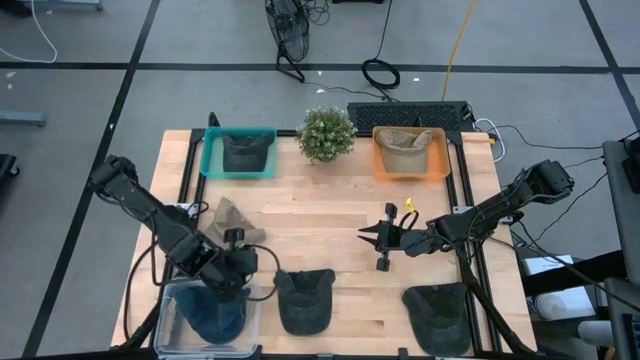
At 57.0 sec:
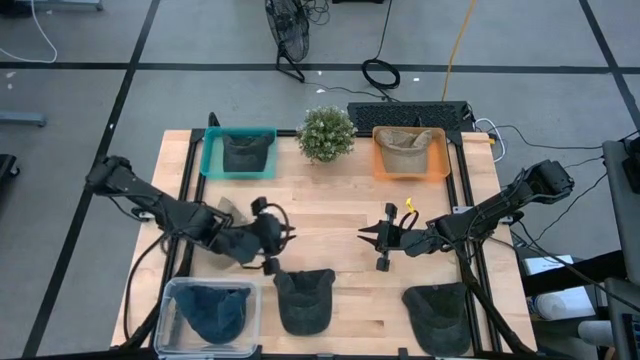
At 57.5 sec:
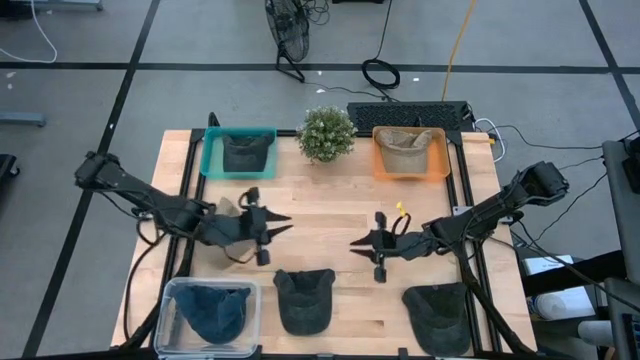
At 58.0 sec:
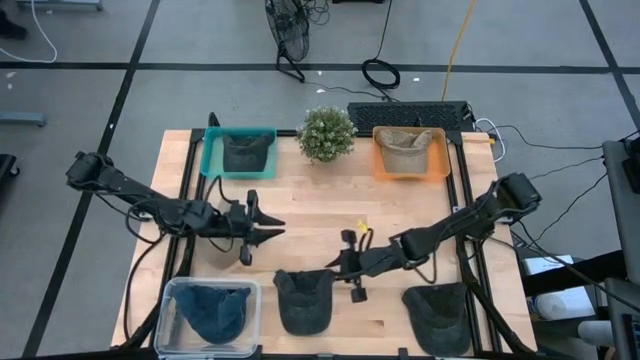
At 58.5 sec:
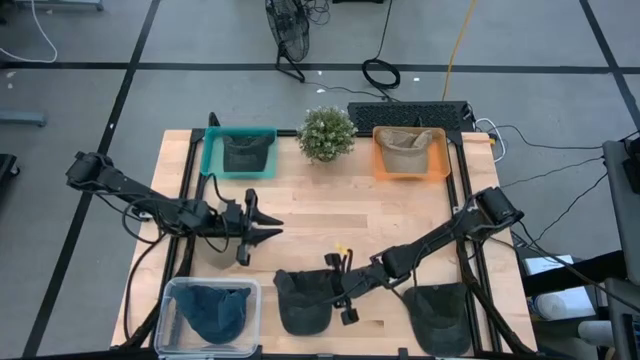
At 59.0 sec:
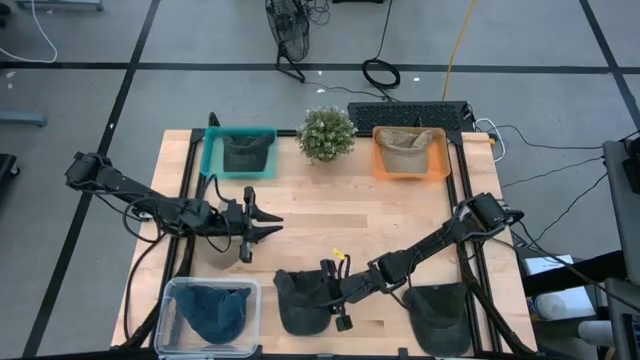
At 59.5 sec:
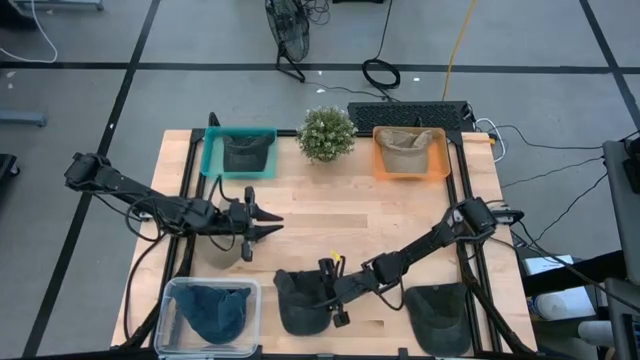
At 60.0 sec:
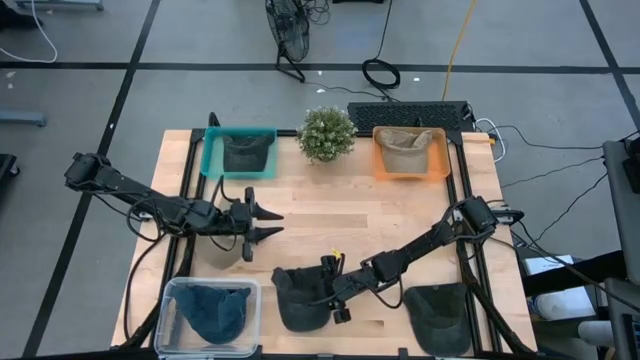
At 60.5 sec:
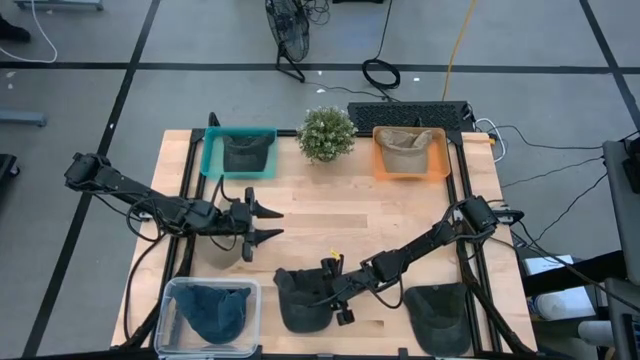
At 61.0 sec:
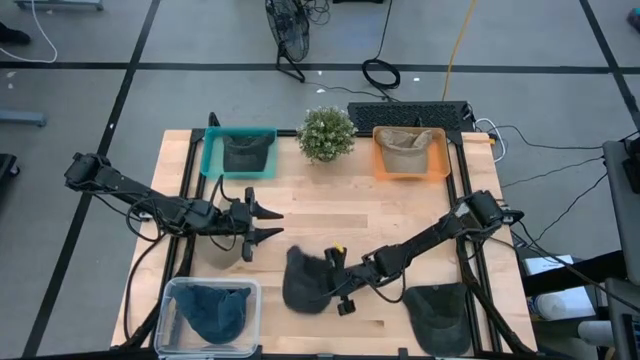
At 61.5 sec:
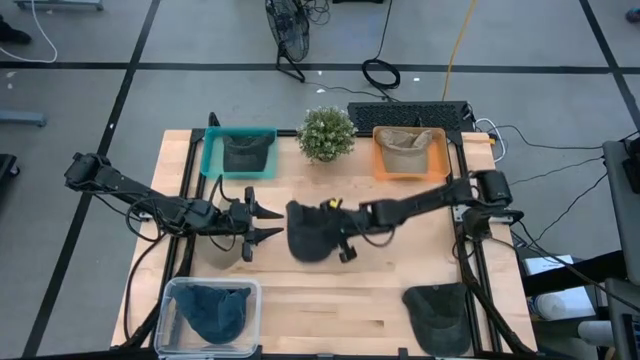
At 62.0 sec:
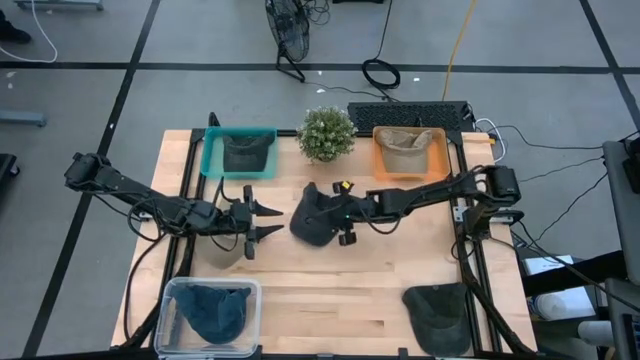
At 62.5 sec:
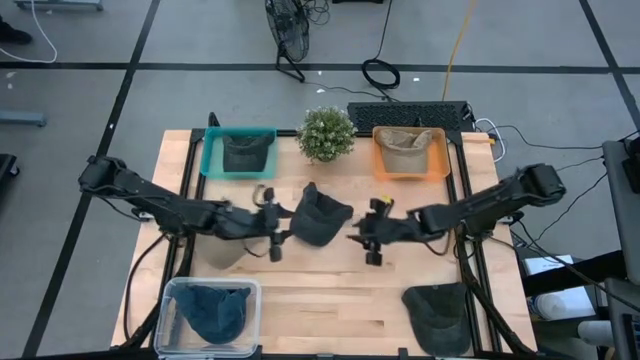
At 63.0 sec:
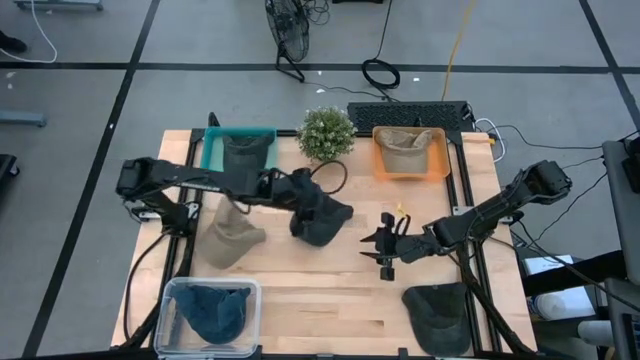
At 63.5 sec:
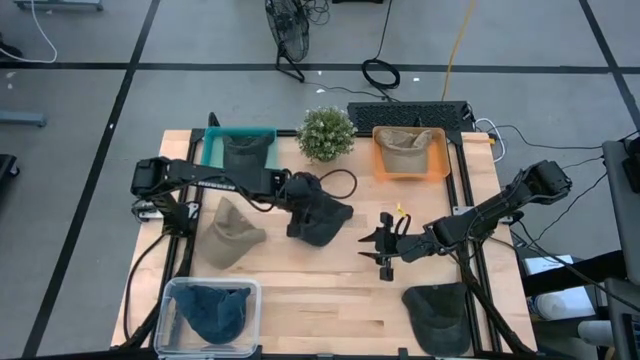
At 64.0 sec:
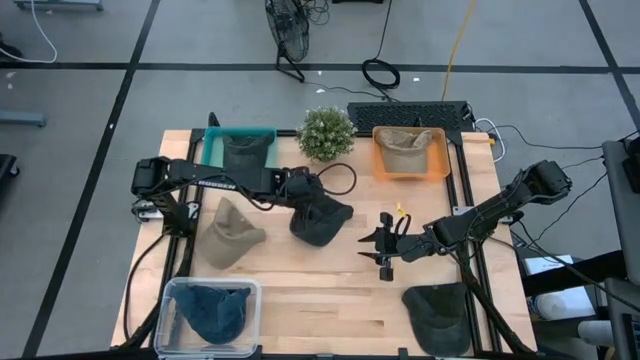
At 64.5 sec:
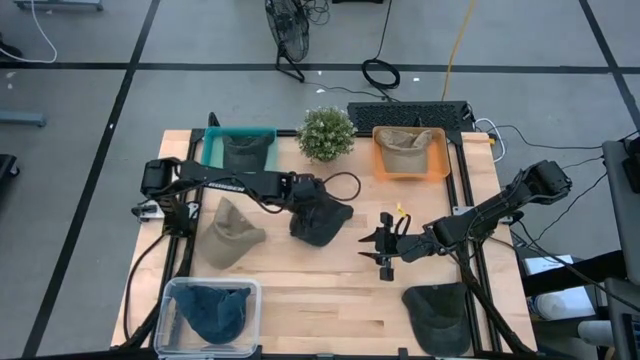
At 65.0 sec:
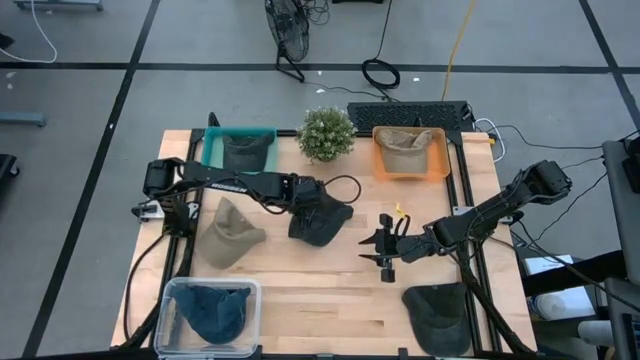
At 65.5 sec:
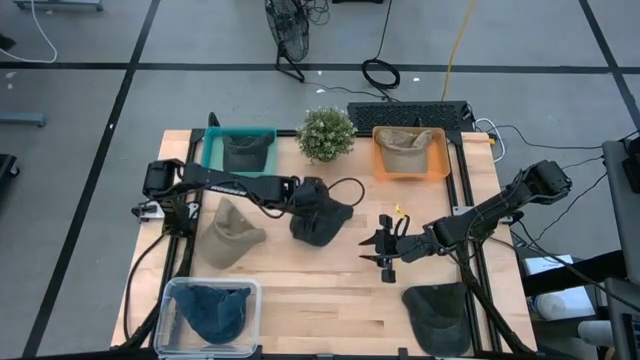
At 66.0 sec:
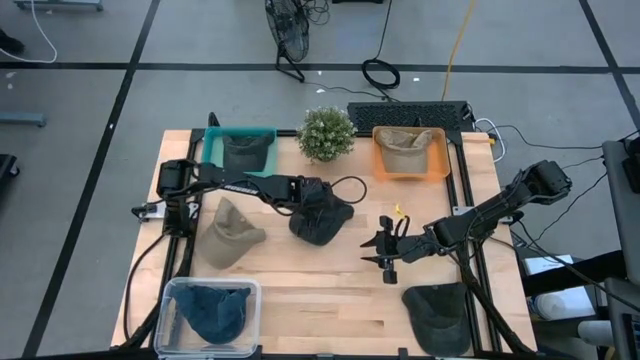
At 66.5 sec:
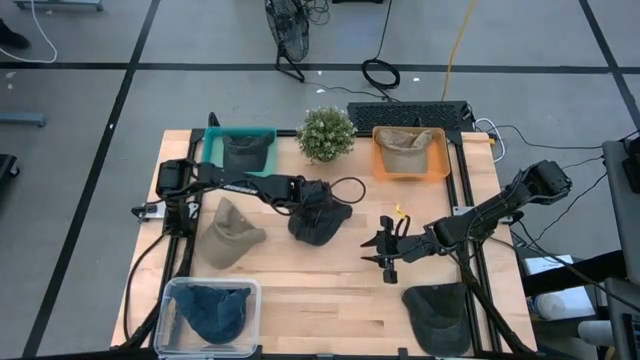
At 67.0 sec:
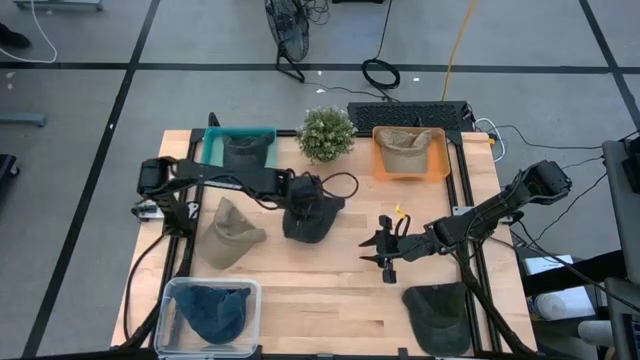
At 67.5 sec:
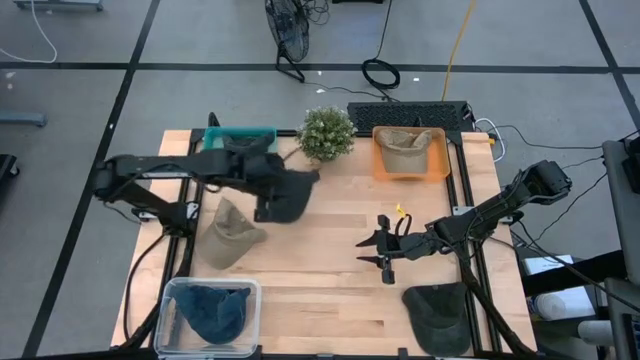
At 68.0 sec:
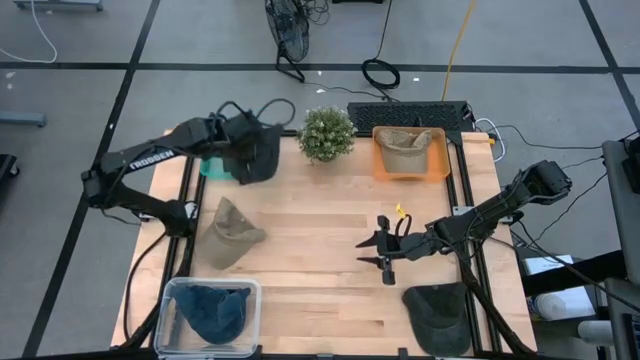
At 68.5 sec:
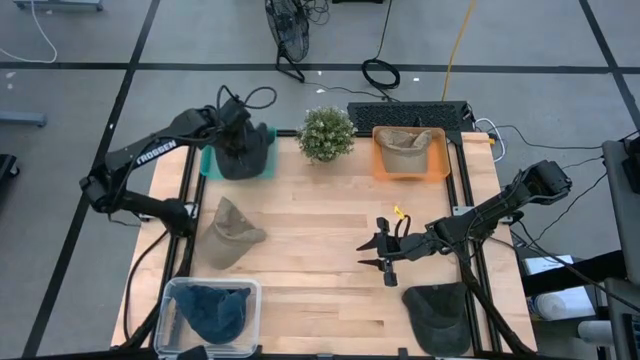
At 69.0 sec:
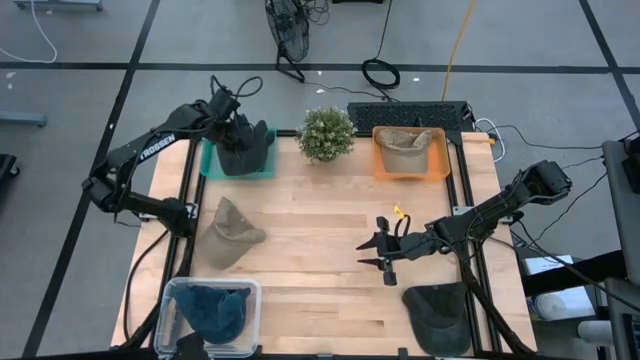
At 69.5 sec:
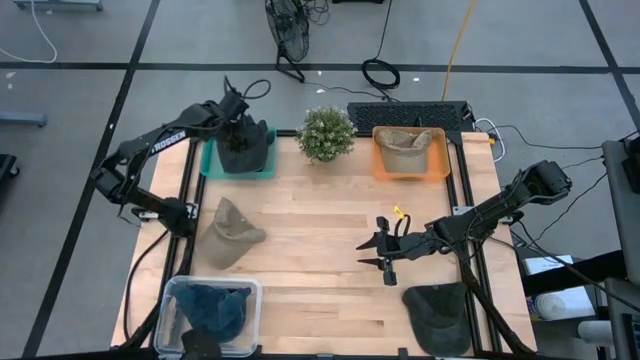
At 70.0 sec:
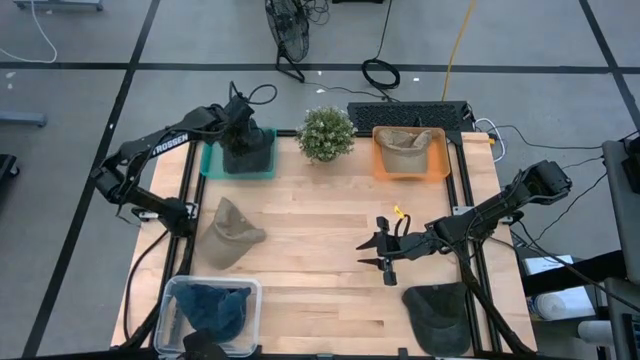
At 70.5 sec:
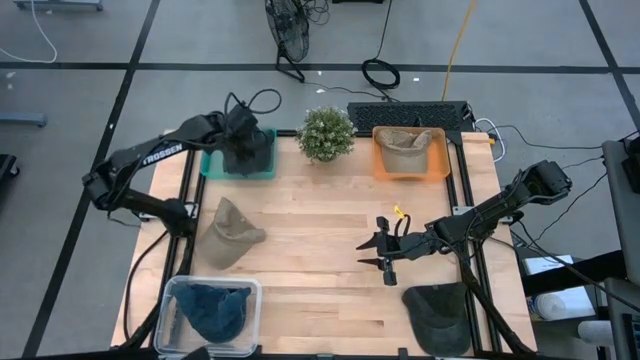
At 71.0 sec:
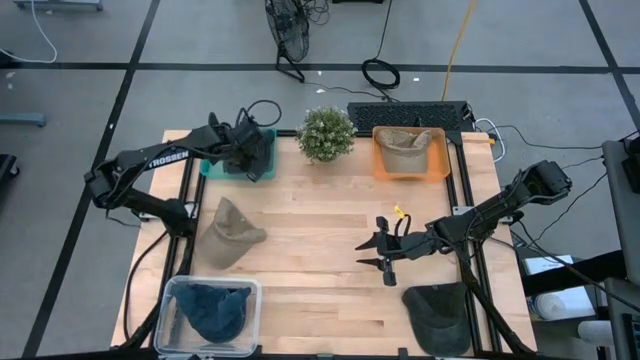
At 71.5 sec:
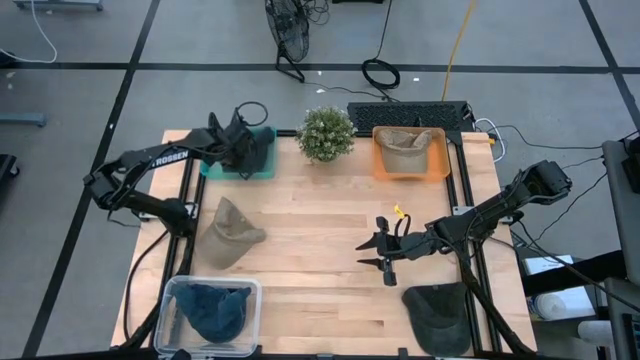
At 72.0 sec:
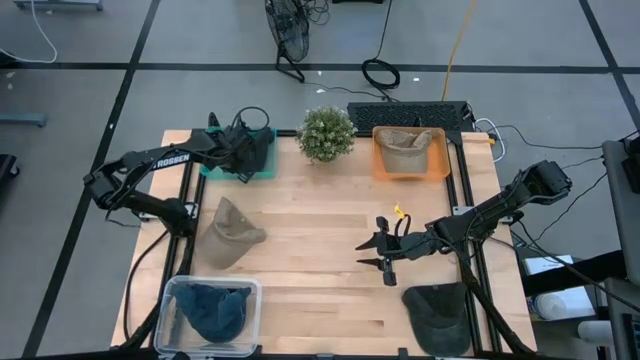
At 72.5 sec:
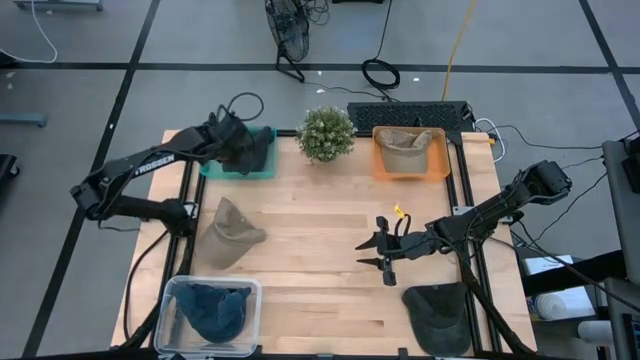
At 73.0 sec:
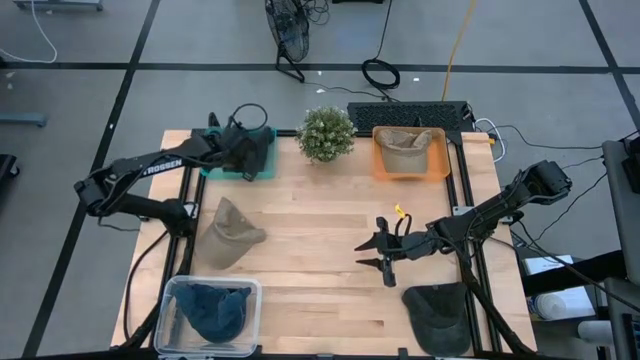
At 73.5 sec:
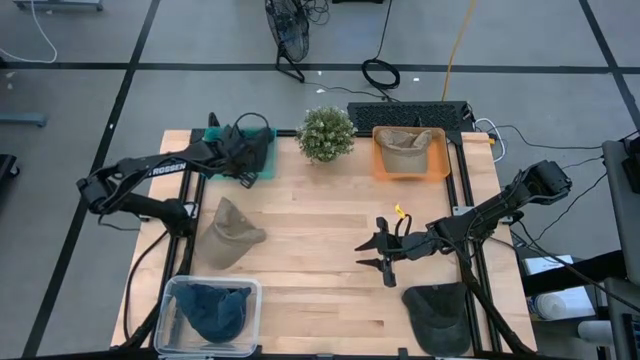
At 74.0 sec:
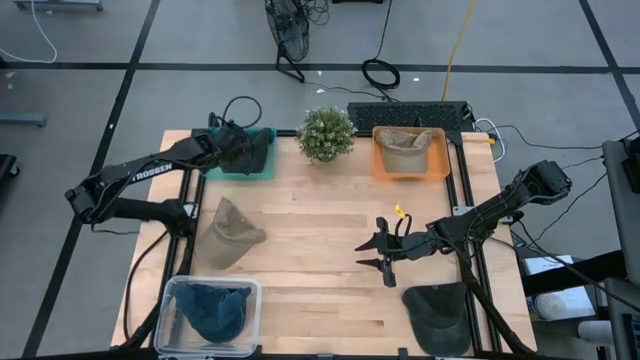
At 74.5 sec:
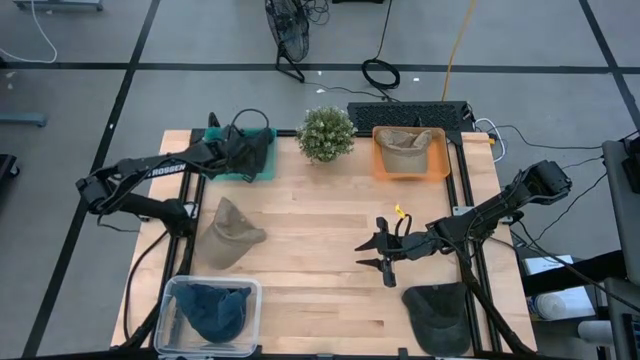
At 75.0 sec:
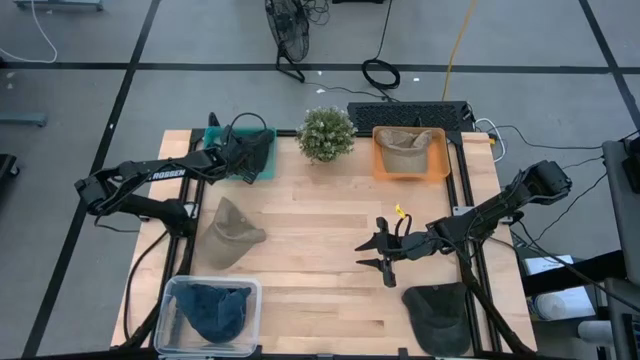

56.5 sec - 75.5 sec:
Task: Pick & Place hat
Put the left black cap into the green bin
